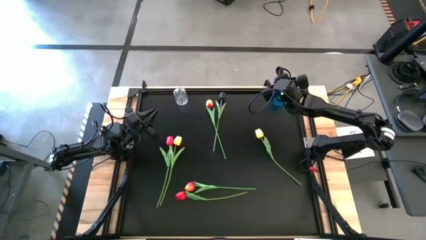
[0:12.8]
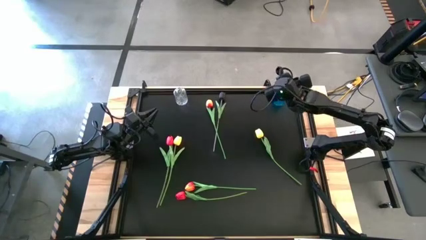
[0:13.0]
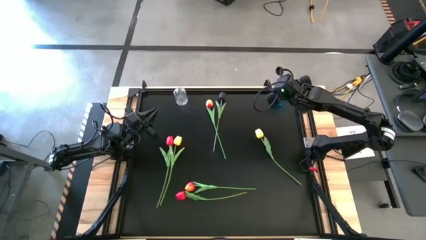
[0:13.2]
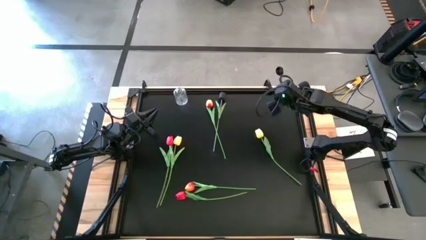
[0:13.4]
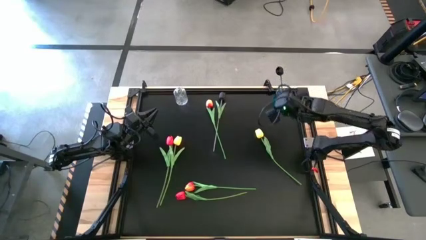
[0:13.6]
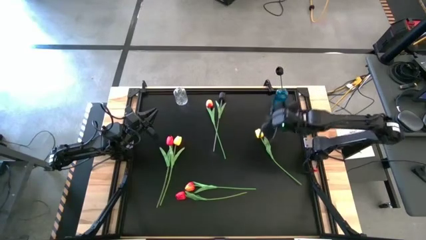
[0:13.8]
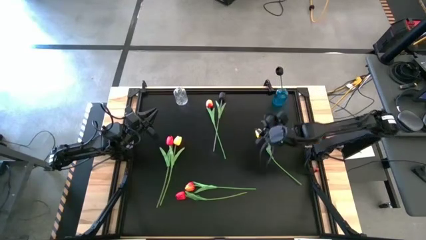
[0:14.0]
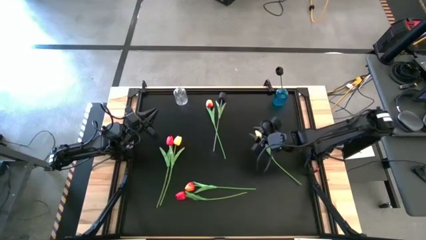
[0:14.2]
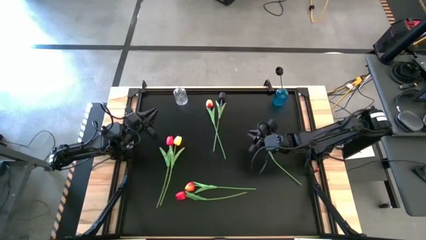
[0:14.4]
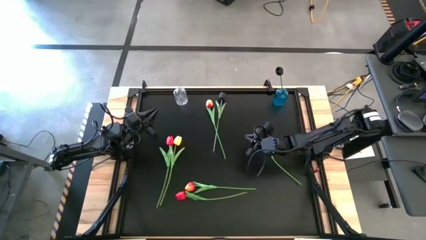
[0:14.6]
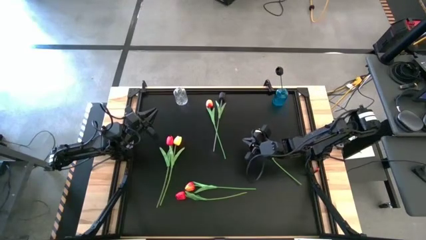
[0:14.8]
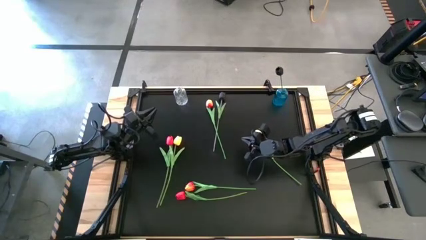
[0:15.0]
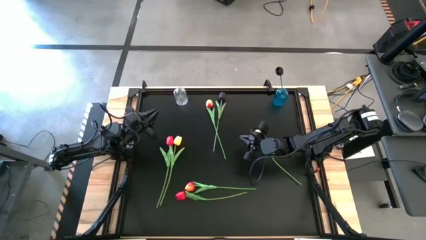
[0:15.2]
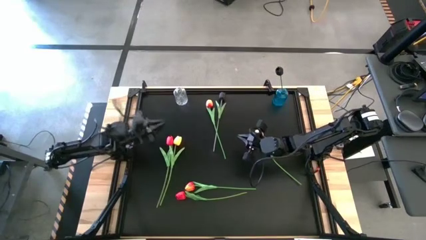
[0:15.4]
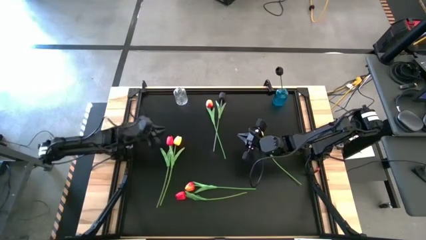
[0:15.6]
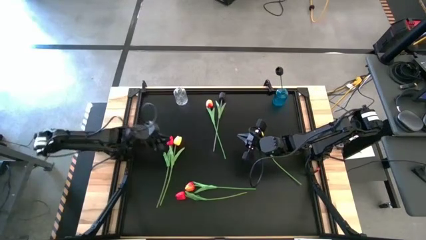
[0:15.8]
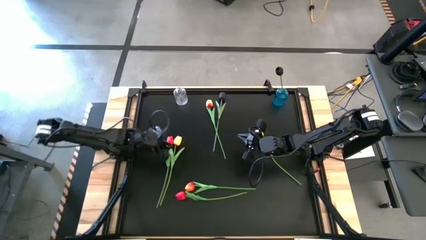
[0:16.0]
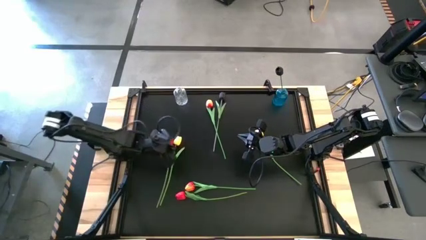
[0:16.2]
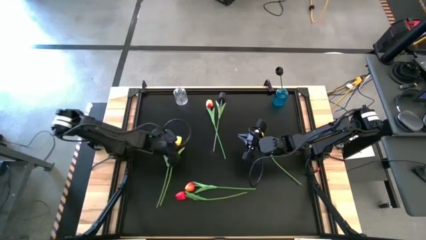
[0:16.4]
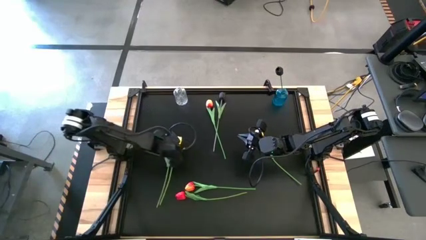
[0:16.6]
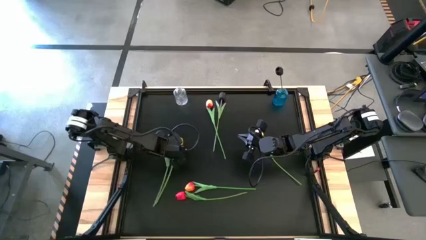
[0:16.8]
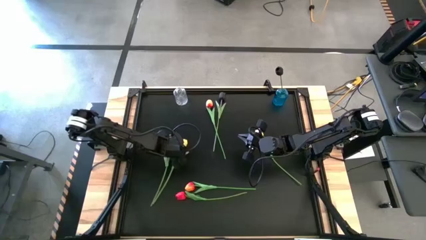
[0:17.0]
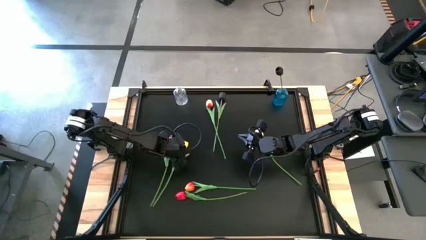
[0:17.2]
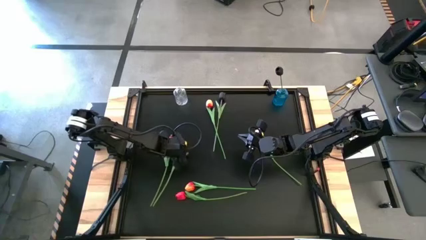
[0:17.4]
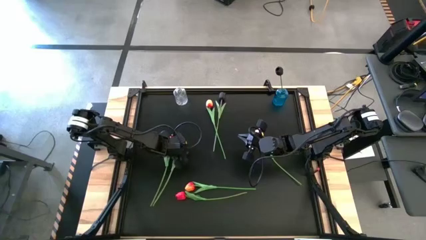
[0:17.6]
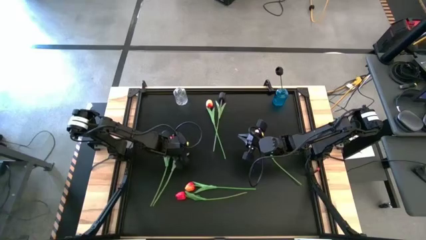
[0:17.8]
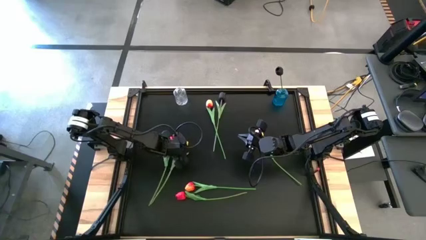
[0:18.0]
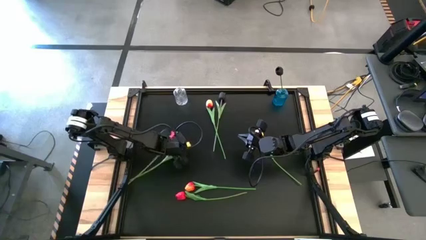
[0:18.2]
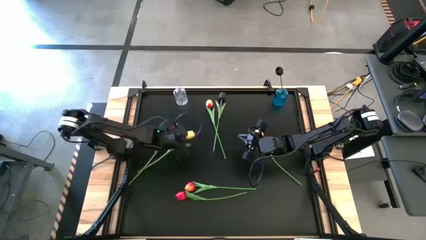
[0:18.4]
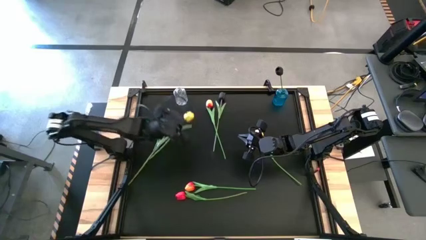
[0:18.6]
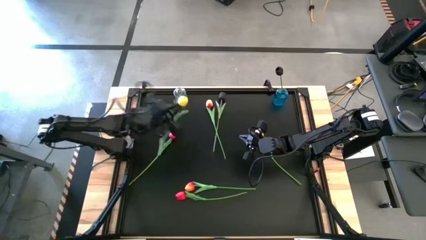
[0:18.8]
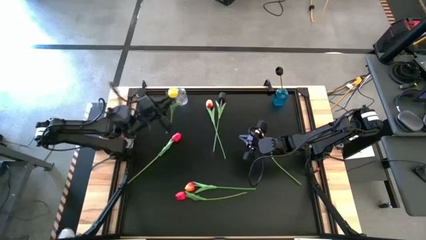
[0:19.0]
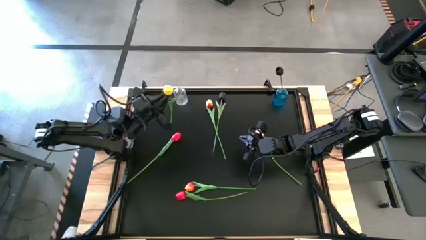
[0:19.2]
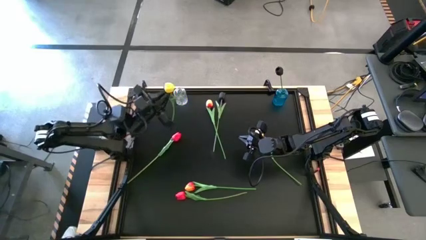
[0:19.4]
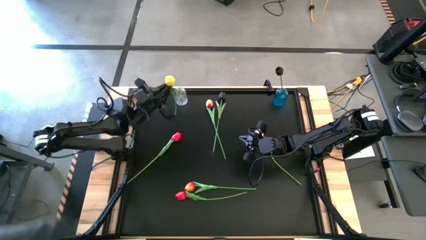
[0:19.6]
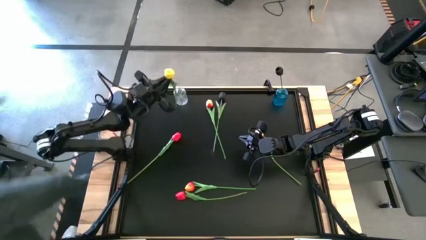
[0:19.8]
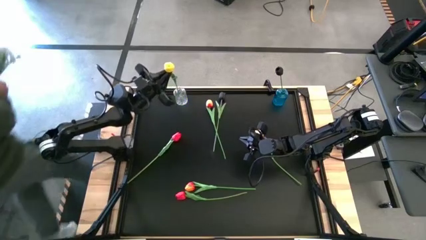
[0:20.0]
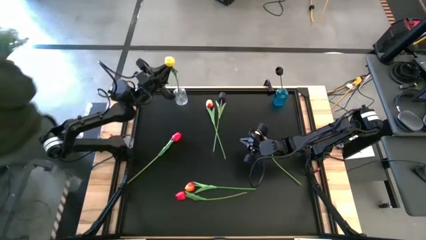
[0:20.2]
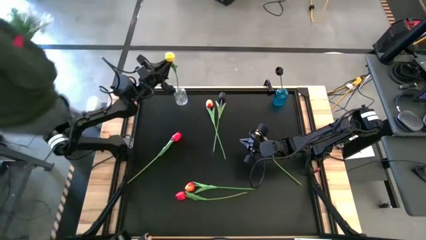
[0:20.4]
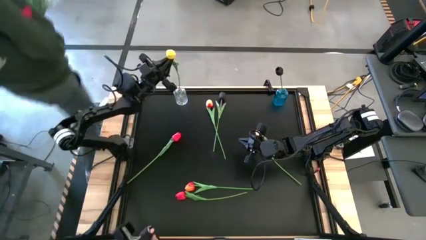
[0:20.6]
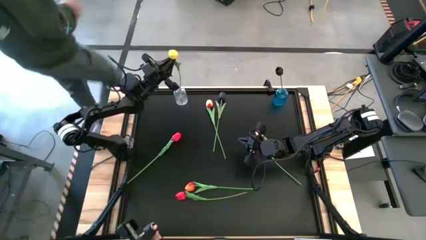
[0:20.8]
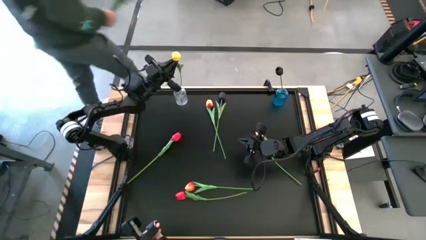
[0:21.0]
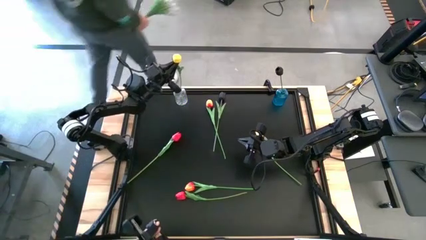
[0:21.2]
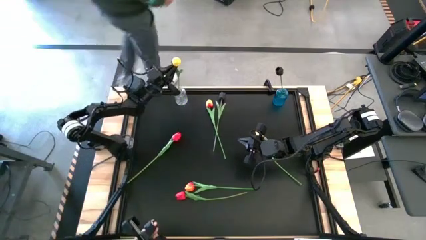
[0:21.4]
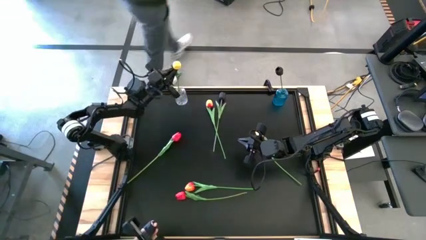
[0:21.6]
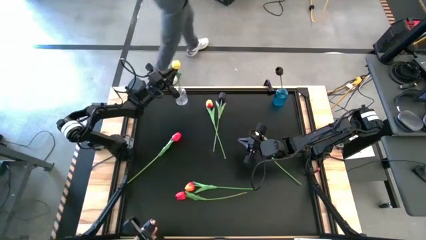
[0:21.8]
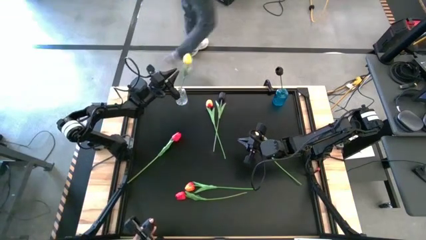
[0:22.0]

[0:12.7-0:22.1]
Task: Sort flowers into vase by color
Put the left yellow flower into the transparent vase

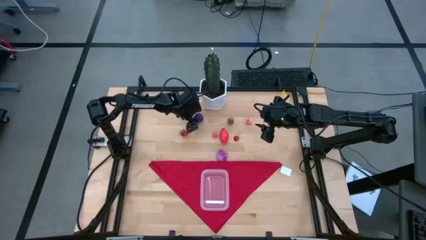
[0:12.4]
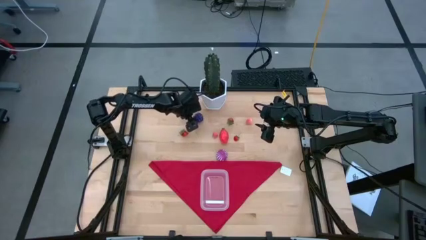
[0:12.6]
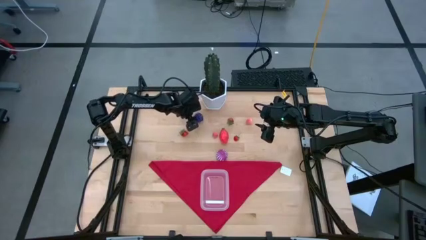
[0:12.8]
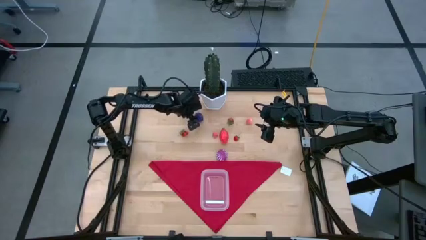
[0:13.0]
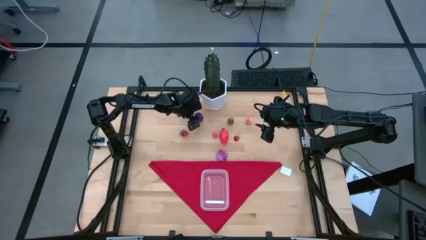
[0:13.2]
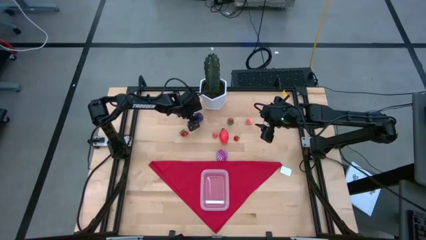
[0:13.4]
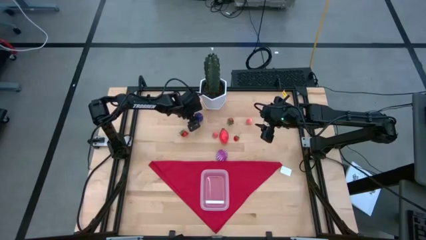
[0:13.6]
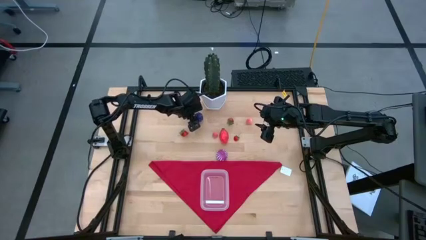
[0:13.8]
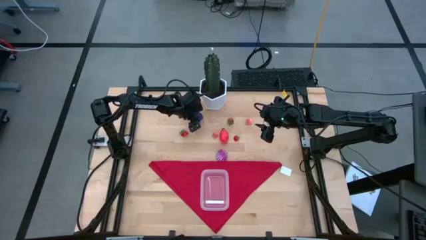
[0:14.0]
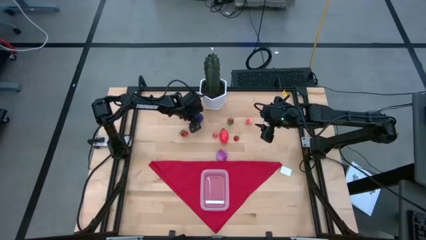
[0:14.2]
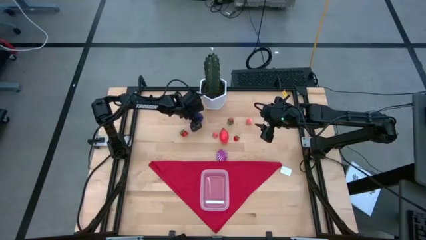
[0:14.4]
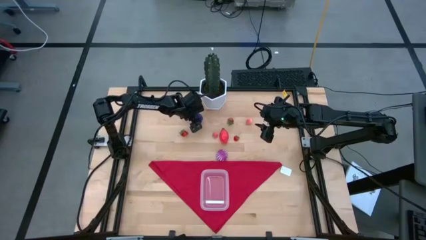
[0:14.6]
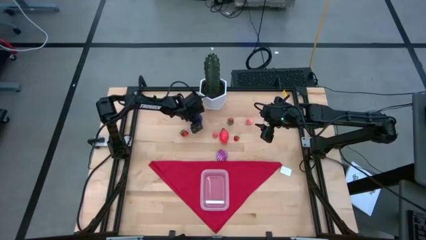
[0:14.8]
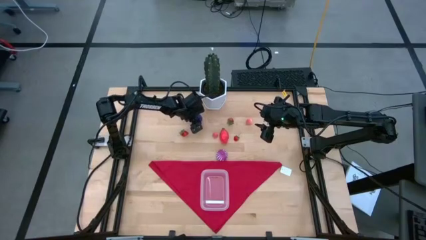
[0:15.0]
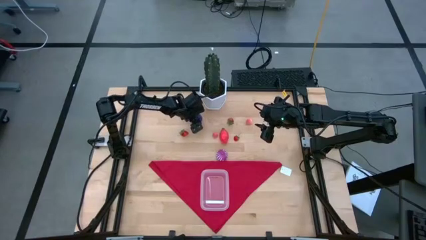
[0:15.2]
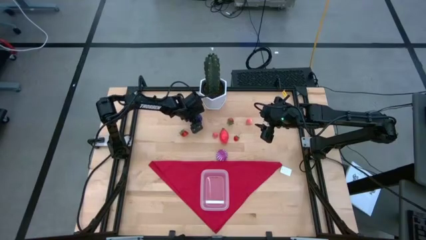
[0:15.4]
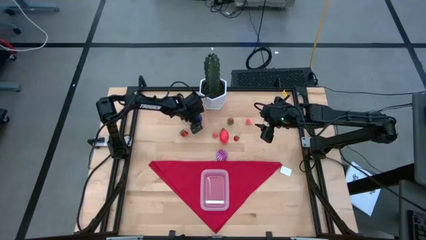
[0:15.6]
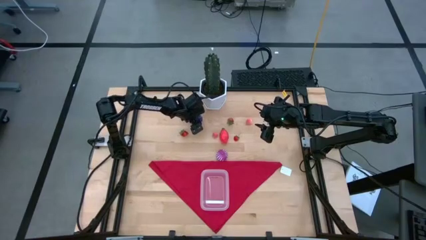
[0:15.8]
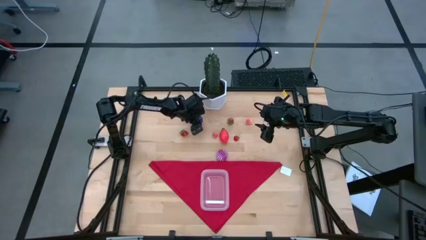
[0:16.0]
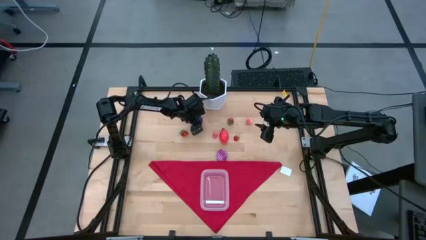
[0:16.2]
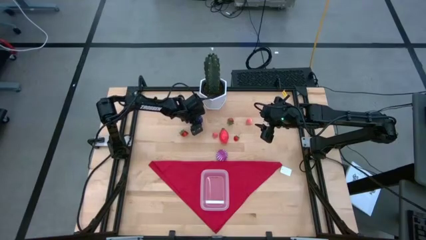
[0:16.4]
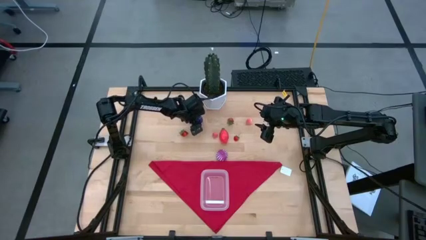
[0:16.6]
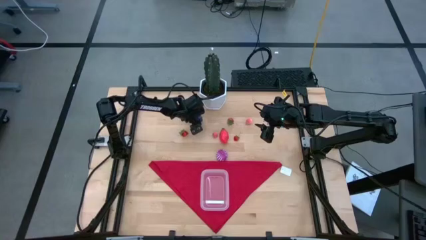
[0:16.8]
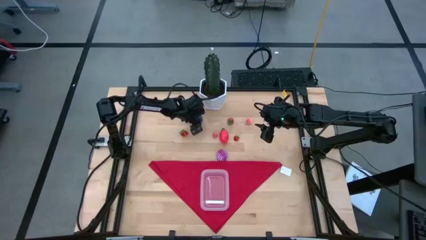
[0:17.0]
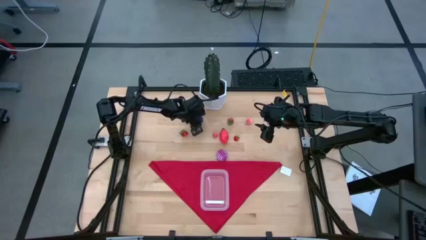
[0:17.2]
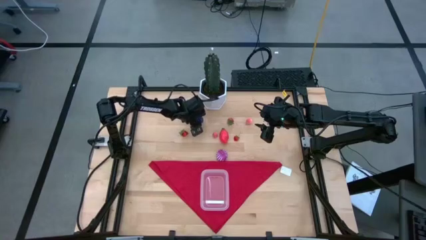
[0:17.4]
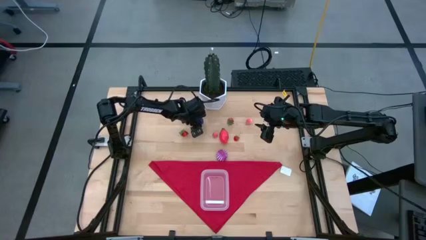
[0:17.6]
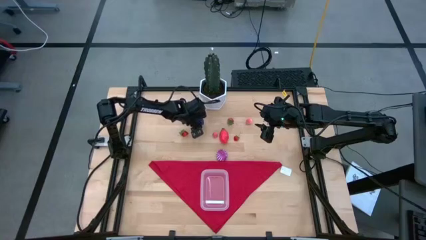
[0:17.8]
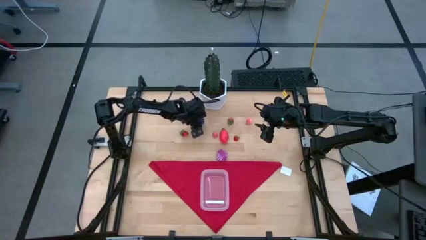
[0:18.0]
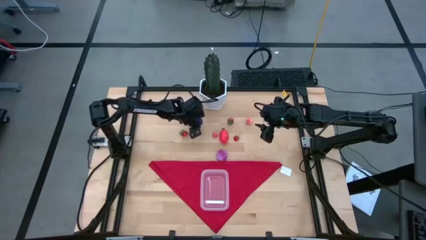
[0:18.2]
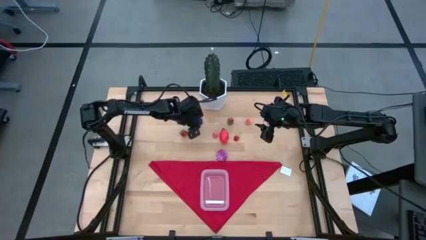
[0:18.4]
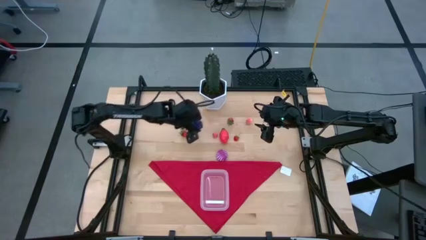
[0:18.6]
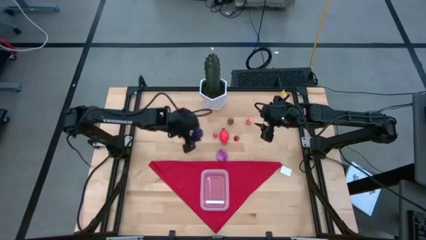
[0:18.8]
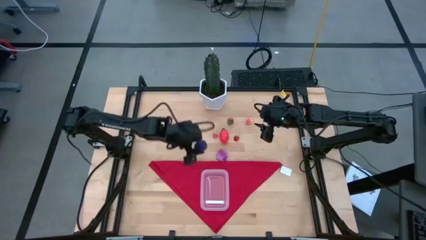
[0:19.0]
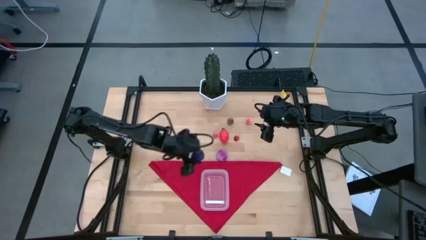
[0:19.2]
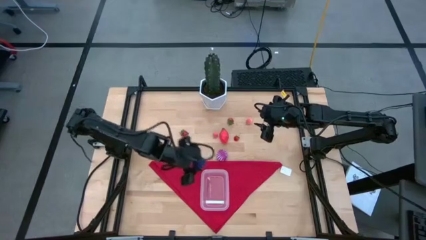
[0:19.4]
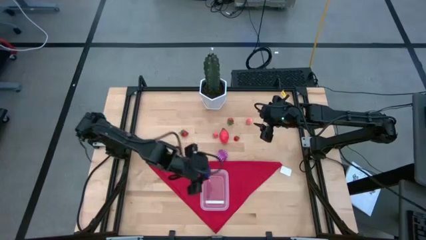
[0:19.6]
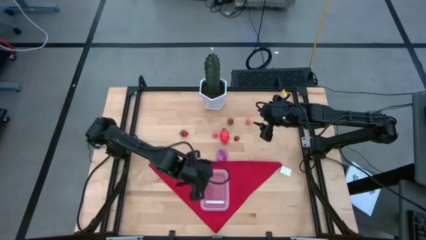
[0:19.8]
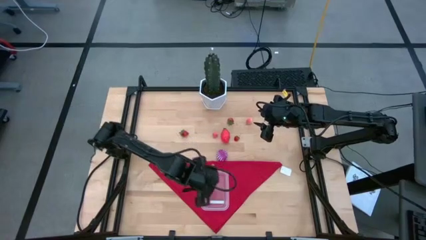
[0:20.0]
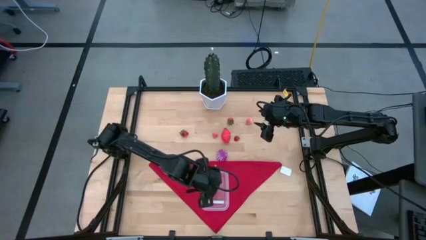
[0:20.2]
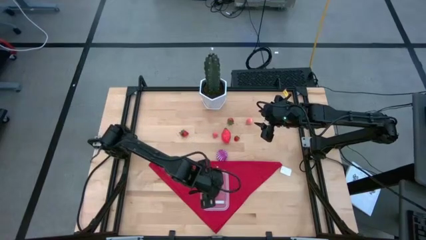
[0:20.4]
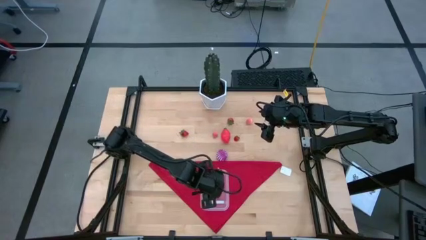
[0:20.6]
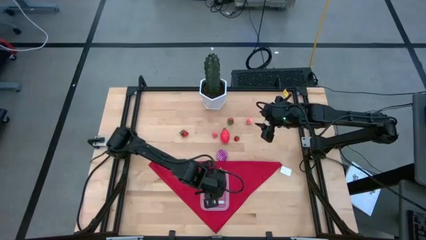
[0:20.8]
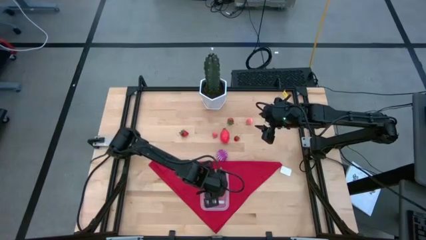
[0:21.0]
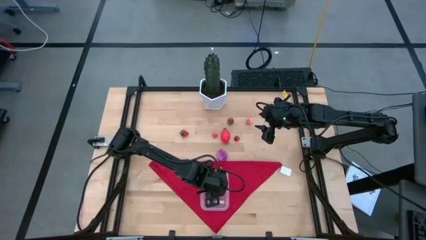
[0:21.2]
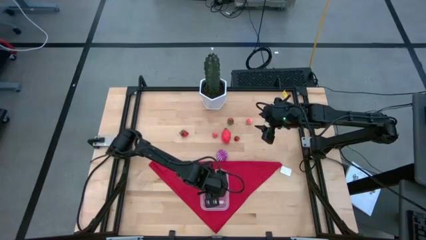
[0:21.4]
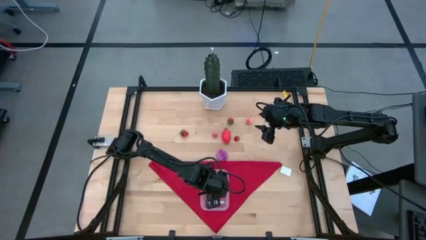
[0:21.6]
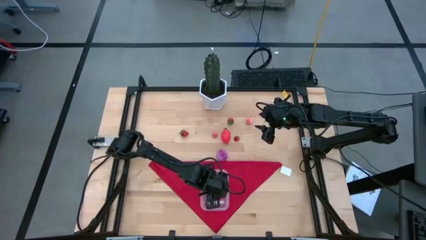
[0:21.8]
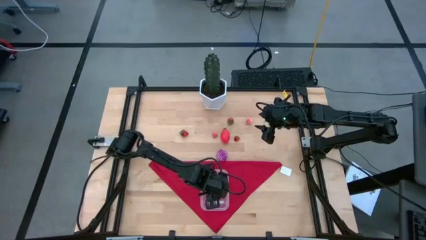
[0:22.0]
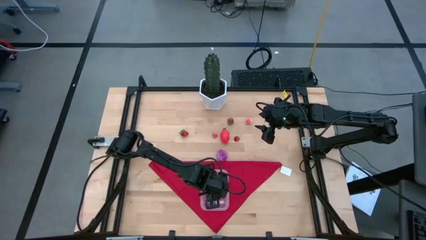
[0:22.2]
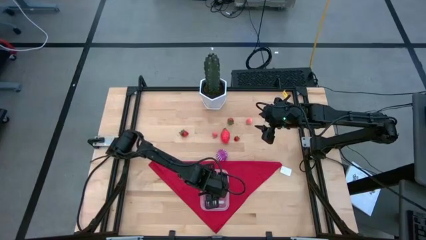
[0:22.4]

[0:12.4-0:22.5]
Task: Pick and placing Produce into tupperware
Put the blackberry into the transparent bin
